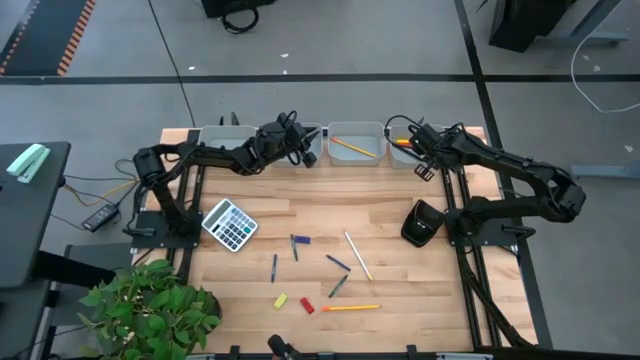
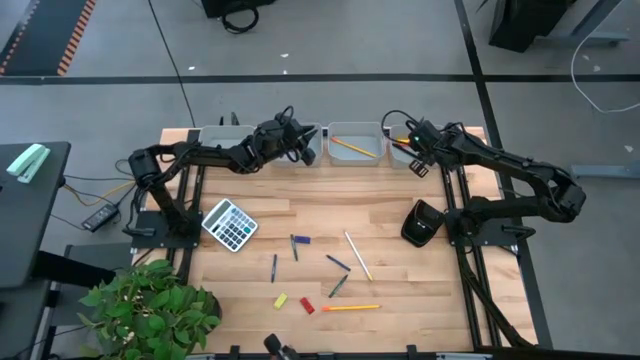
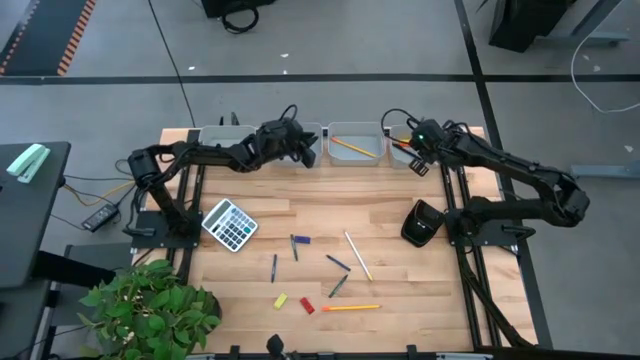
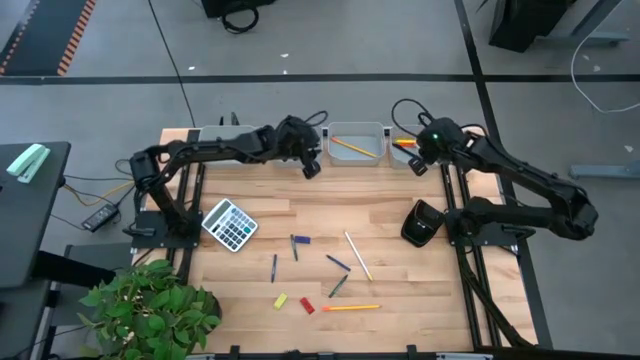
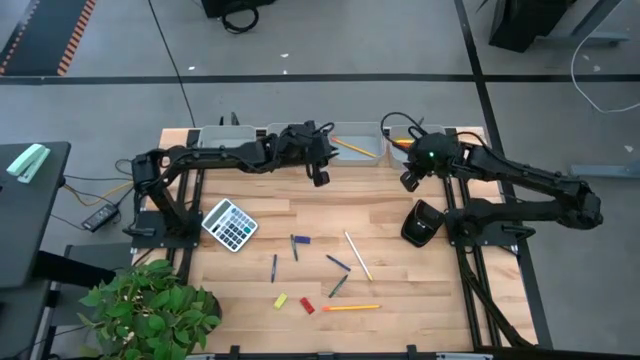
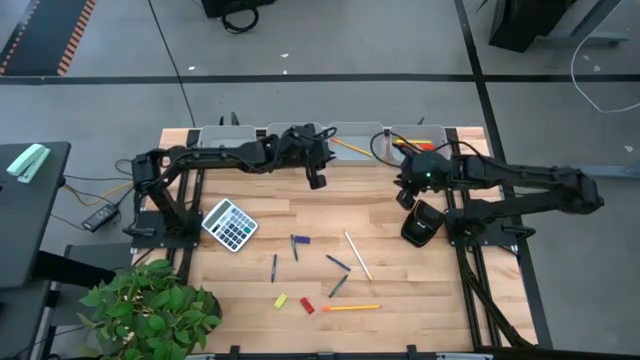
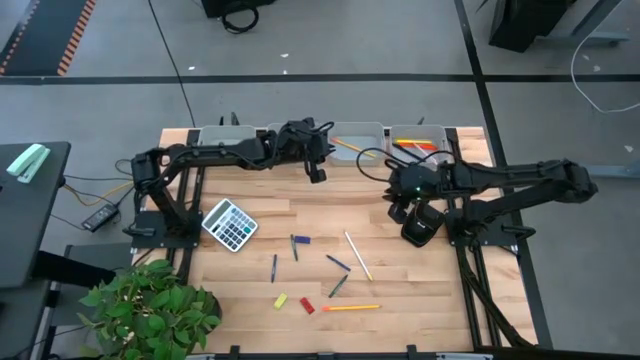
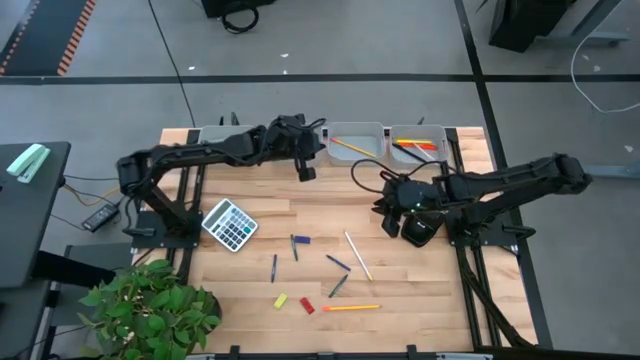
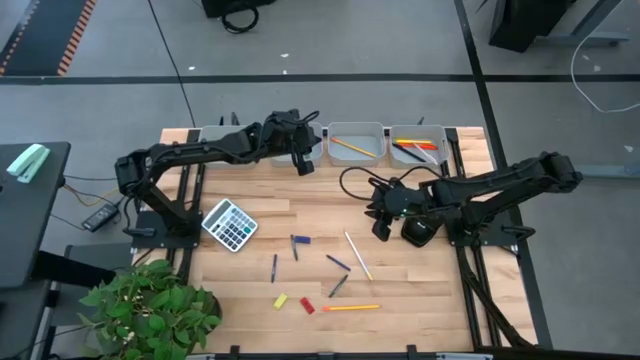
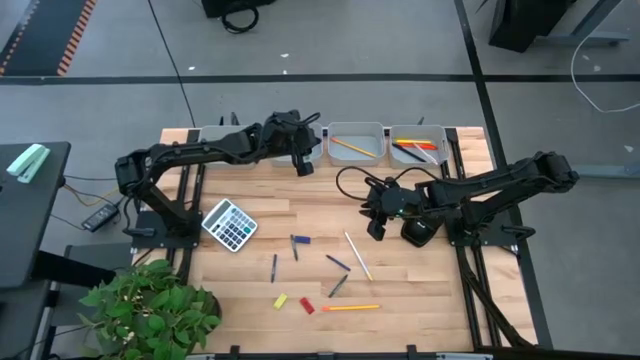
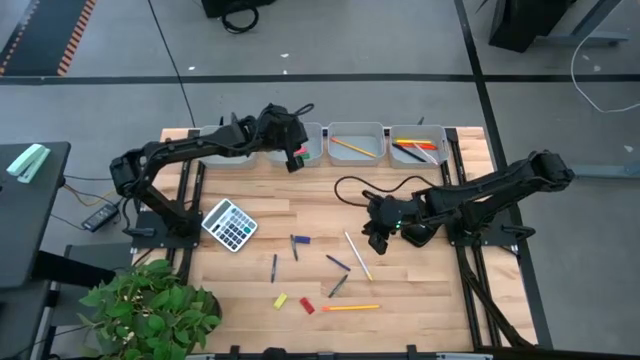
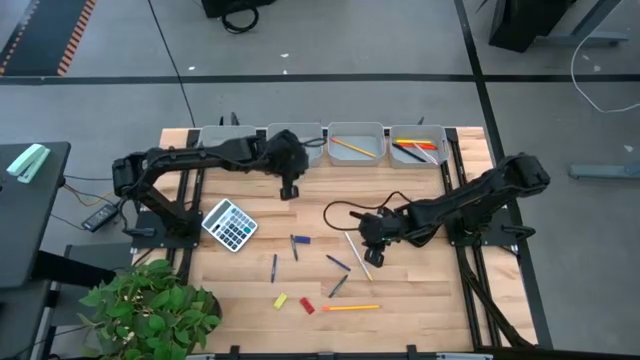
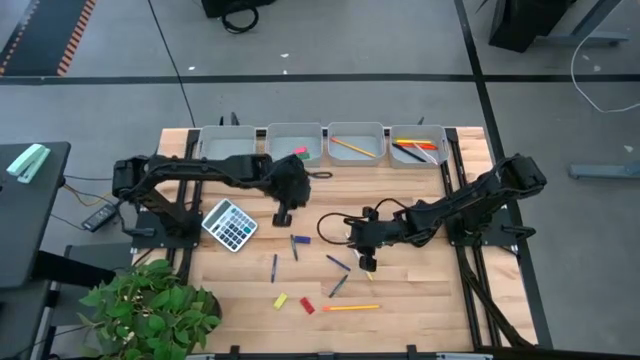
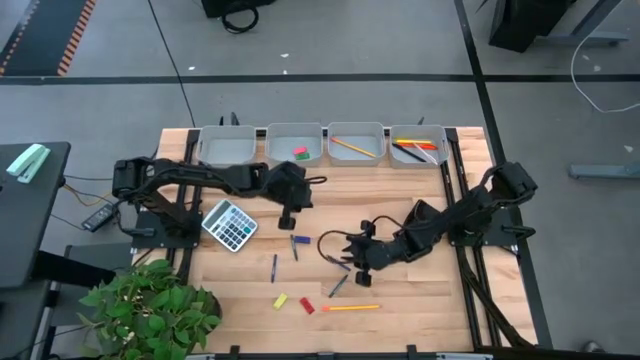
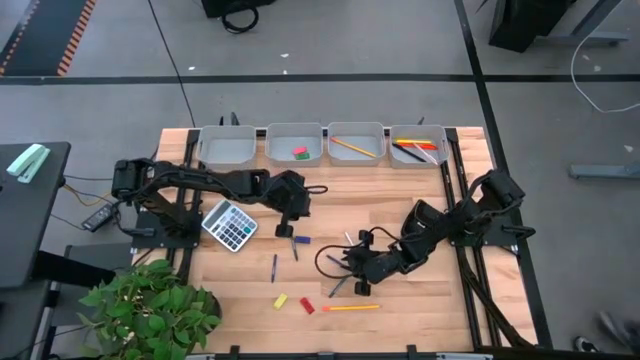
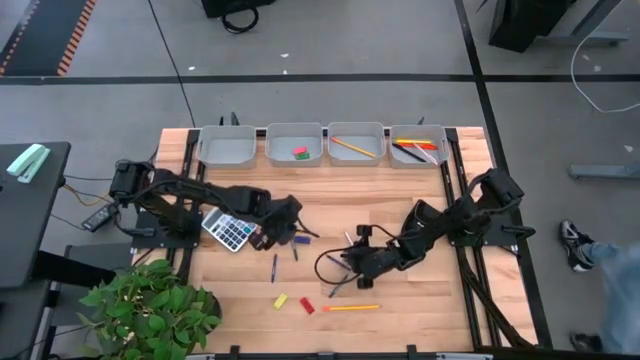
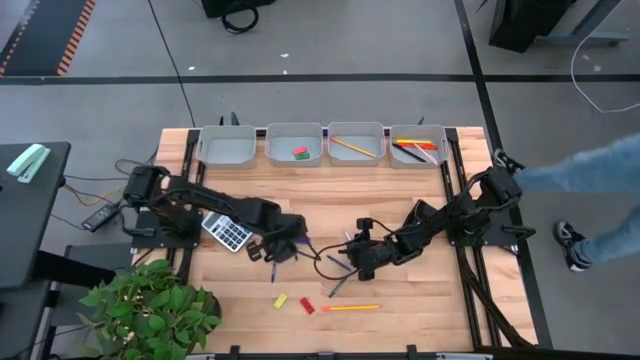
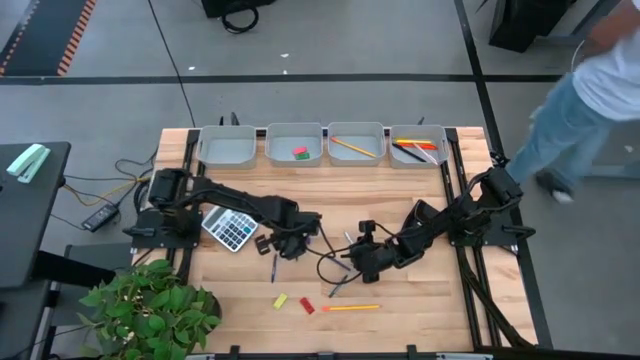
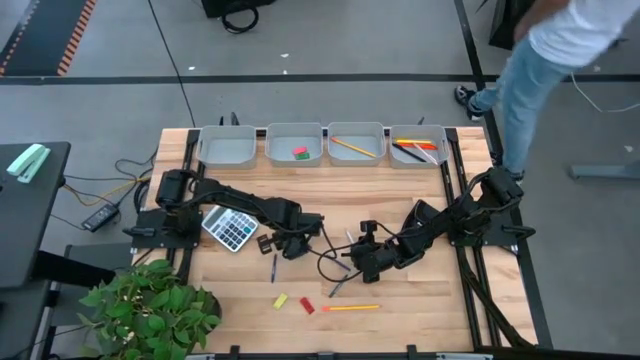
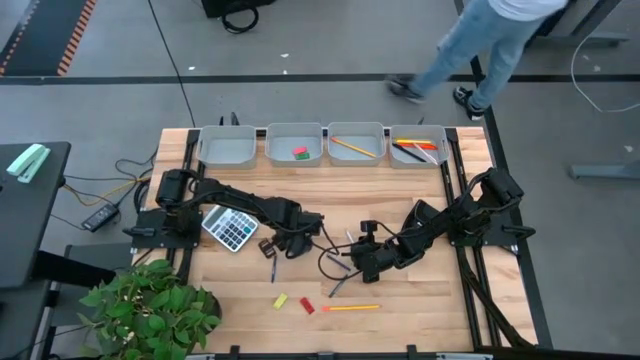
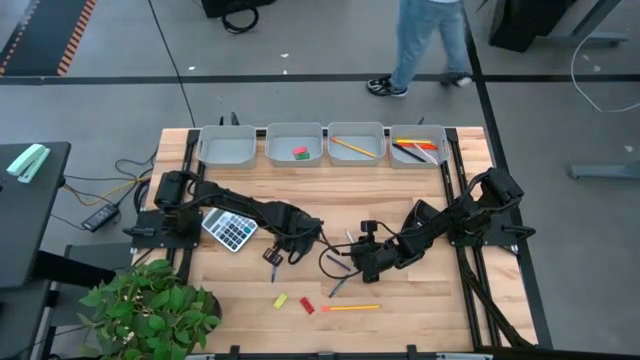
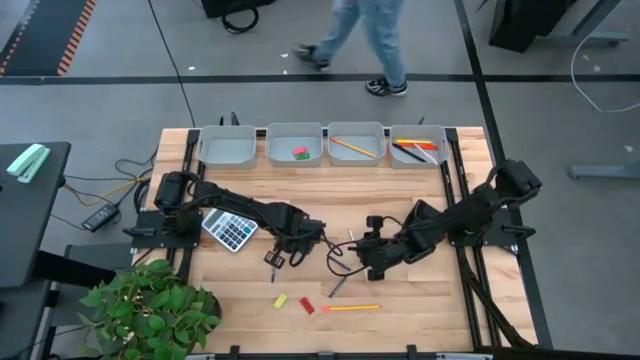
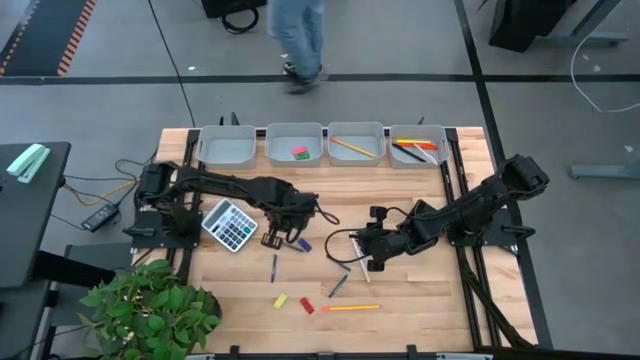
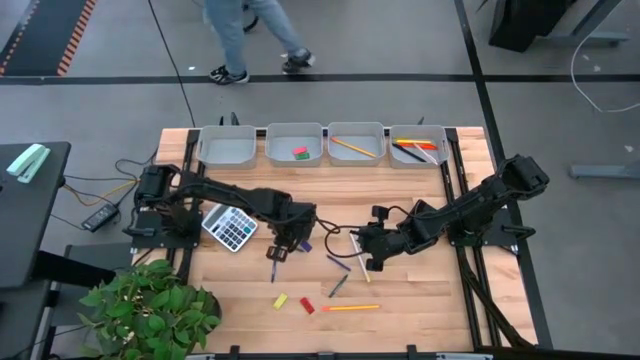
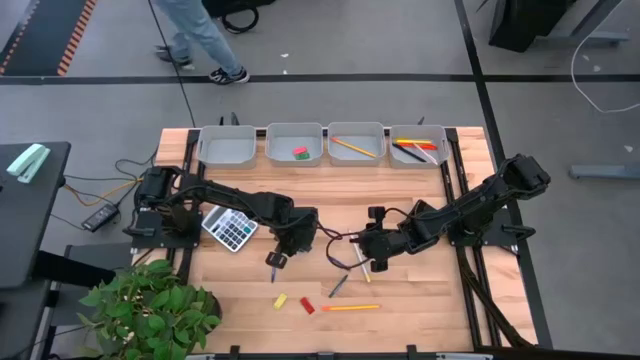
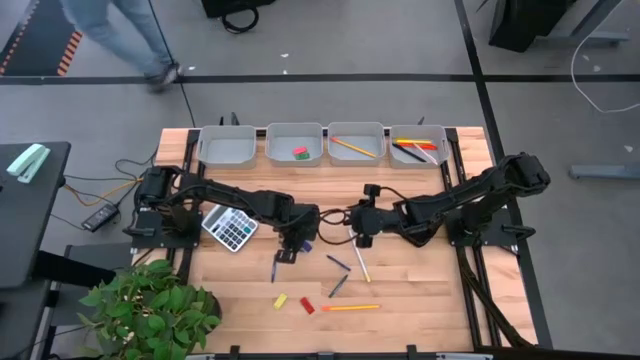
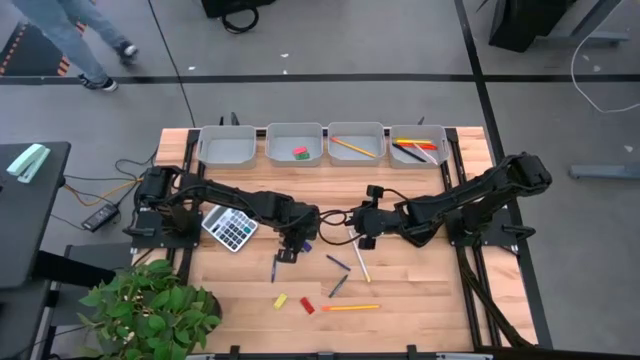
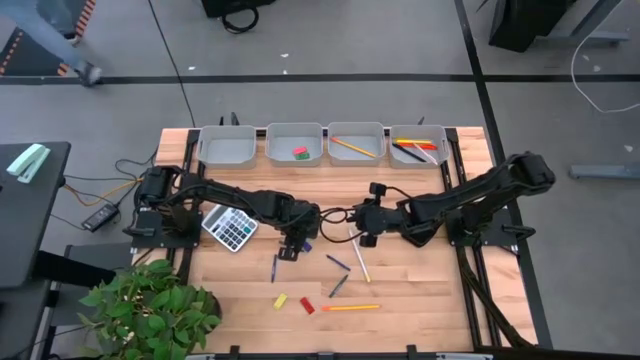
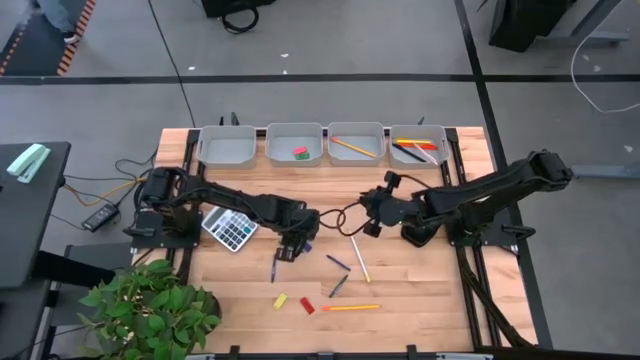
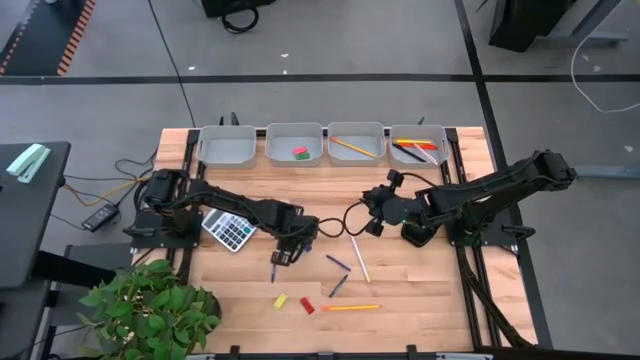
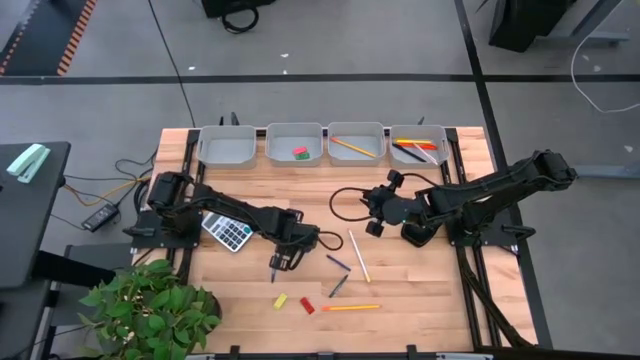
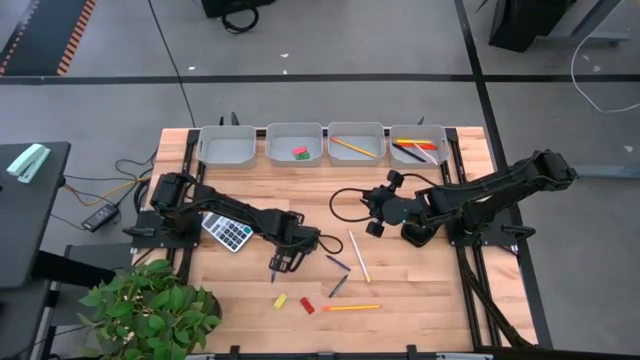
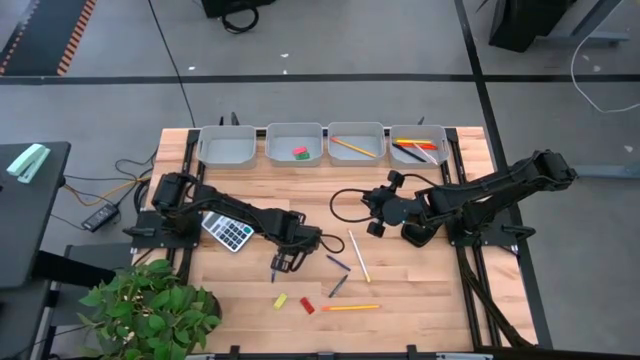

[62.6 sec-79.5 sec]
Task: Sort crayons/erasers/pens/pencils in bins
Put the top green crayon into the gray bin

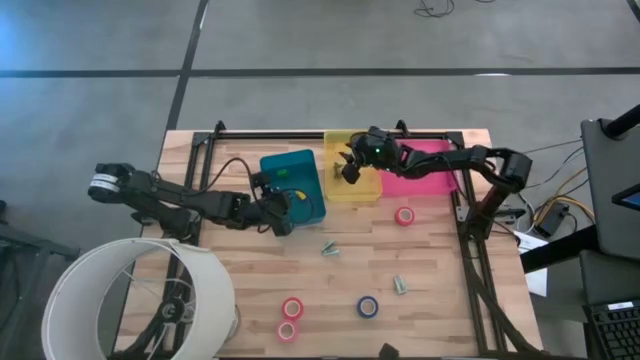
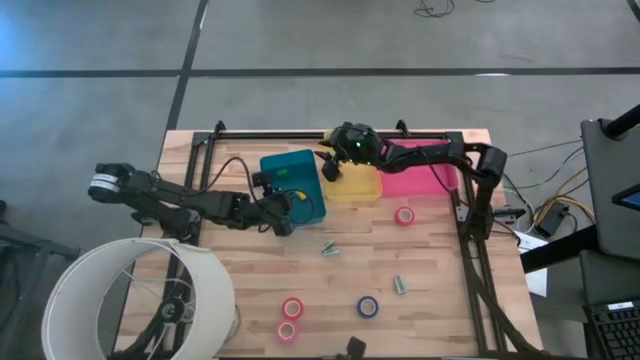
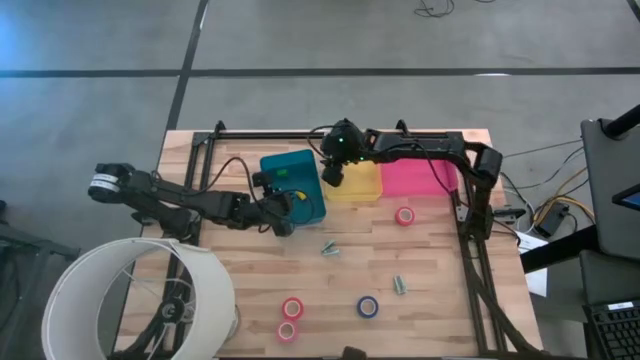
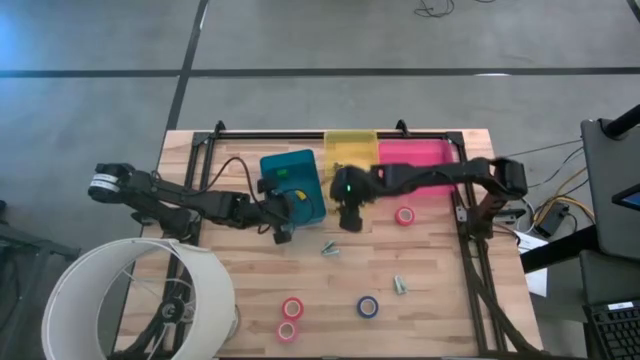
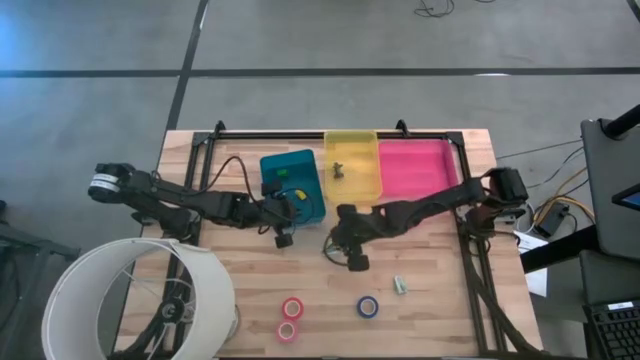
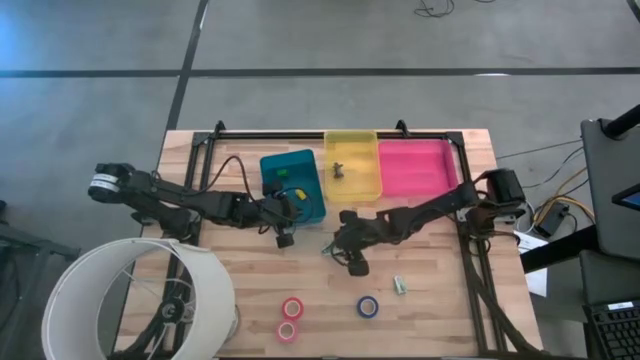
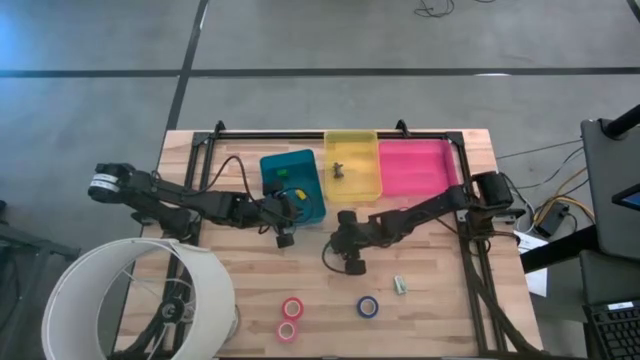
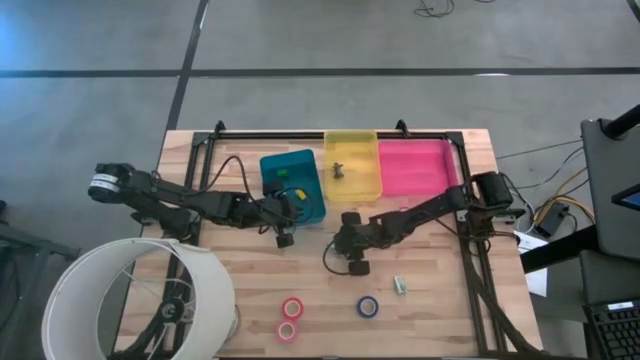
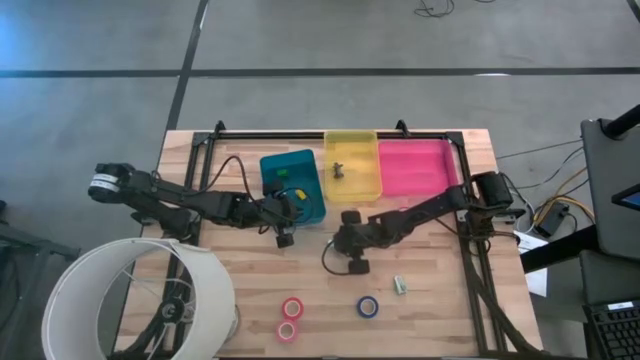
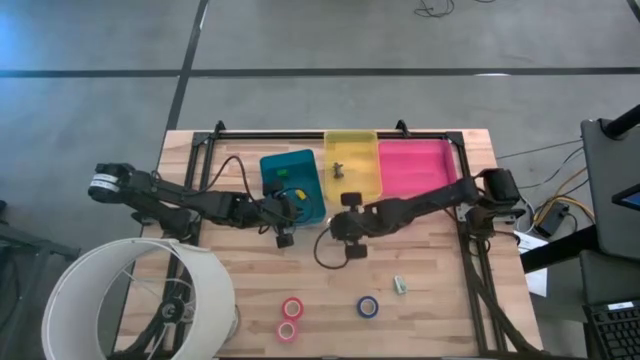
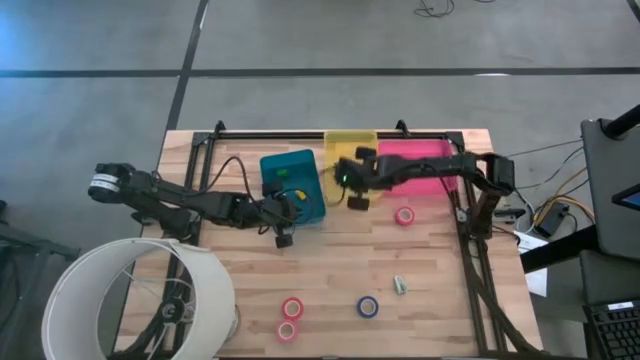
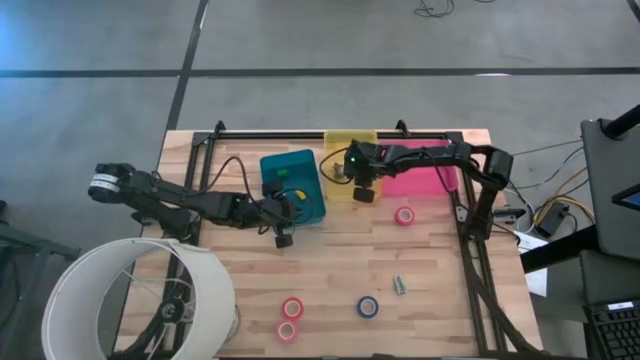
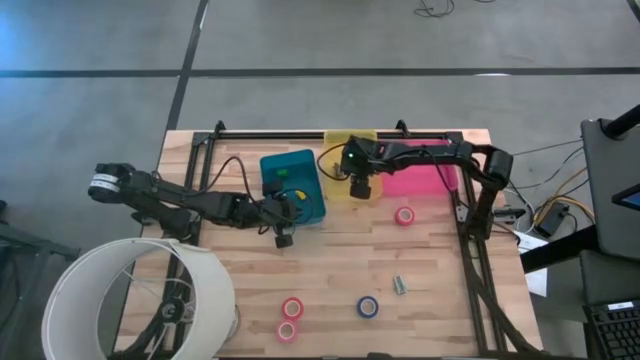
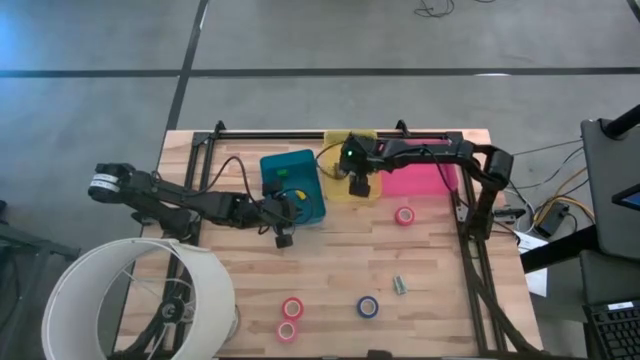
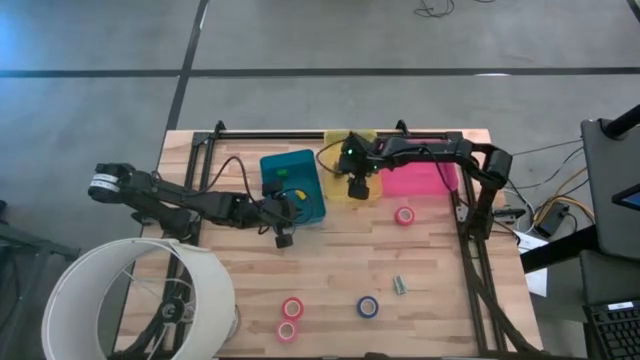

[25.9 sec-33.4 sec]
Task: Pick and place Stapler, Stapler remover, tape
Put the top light blue staple remover into the yellow bin
